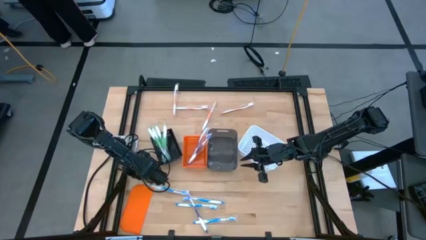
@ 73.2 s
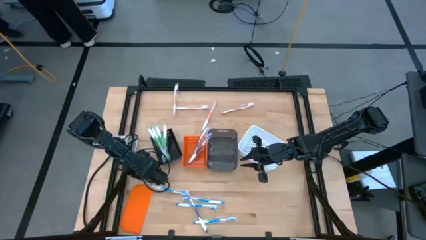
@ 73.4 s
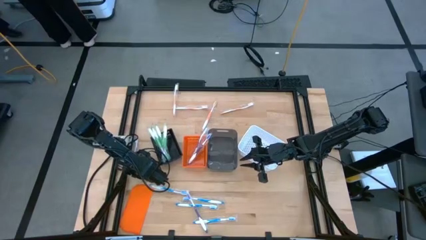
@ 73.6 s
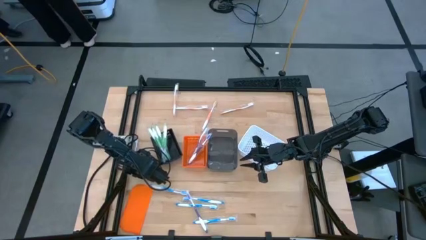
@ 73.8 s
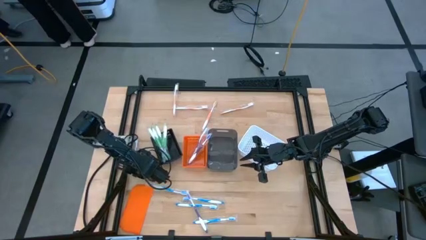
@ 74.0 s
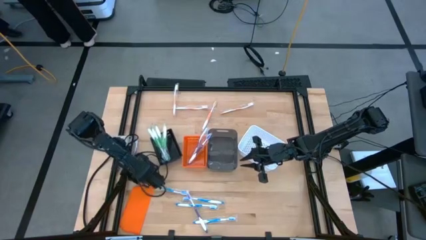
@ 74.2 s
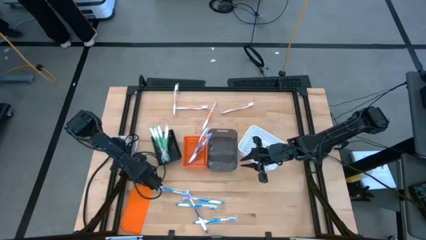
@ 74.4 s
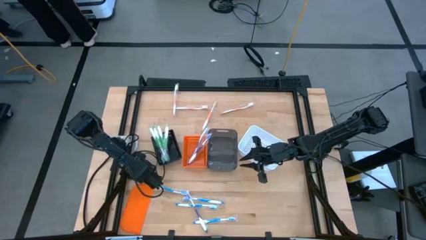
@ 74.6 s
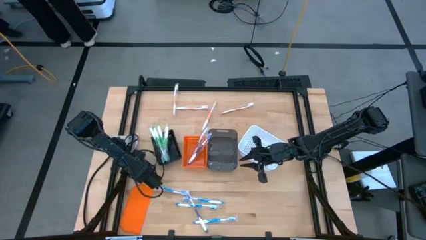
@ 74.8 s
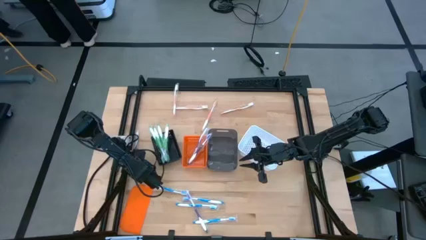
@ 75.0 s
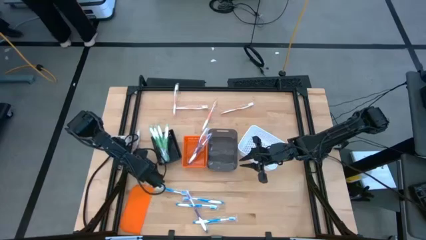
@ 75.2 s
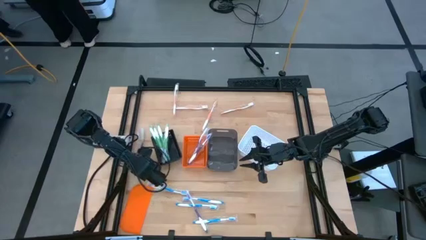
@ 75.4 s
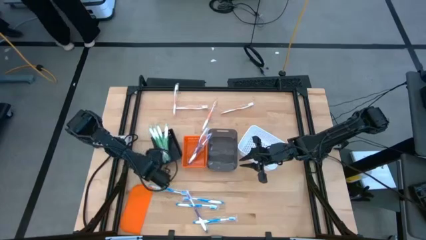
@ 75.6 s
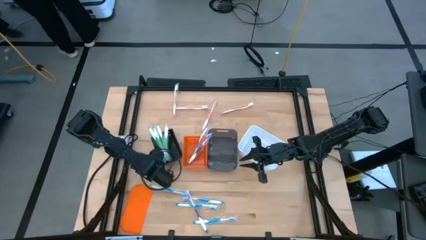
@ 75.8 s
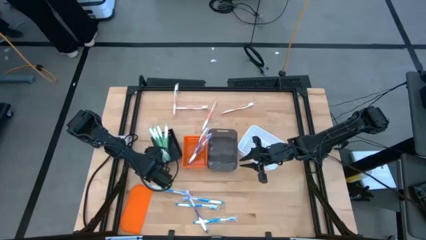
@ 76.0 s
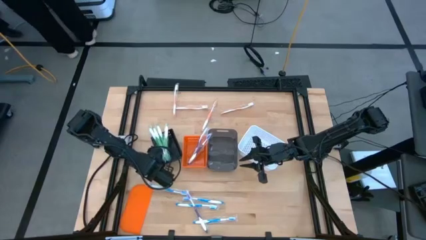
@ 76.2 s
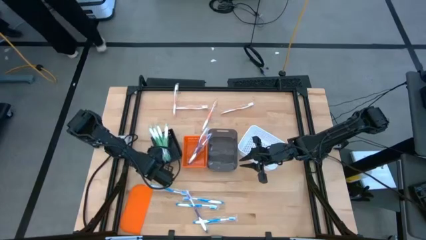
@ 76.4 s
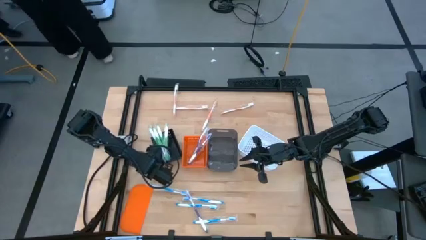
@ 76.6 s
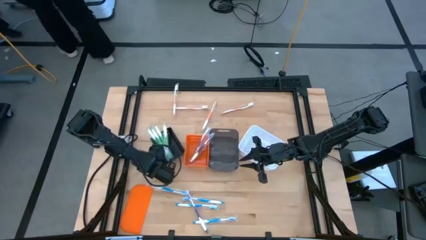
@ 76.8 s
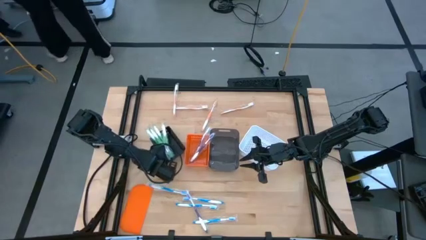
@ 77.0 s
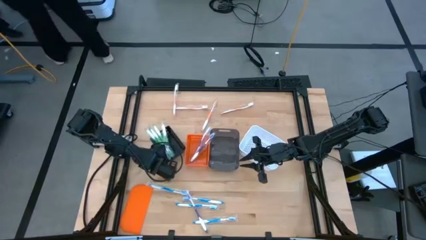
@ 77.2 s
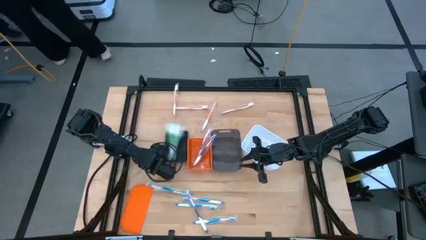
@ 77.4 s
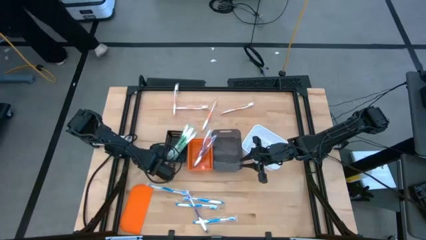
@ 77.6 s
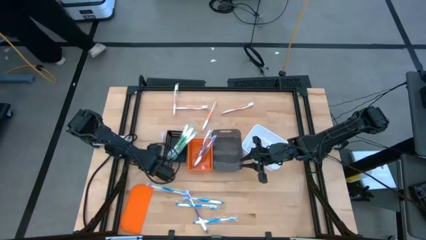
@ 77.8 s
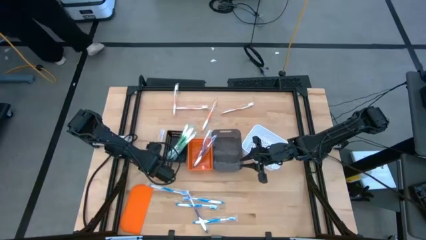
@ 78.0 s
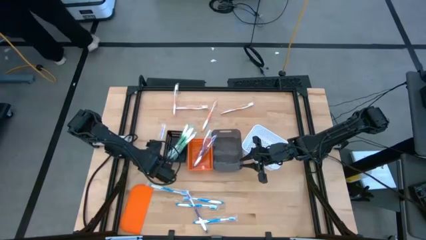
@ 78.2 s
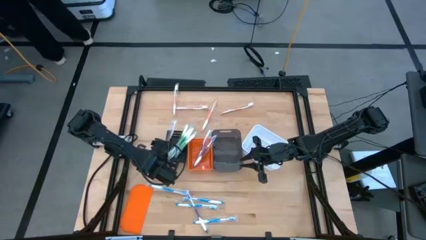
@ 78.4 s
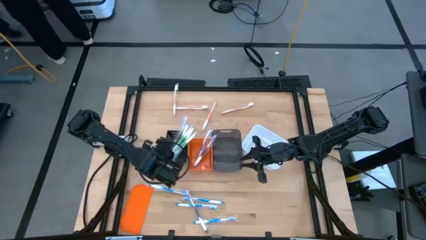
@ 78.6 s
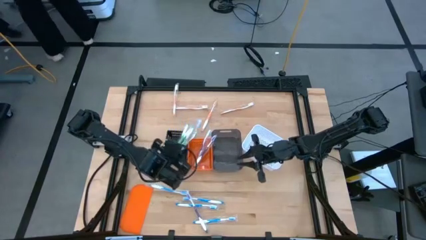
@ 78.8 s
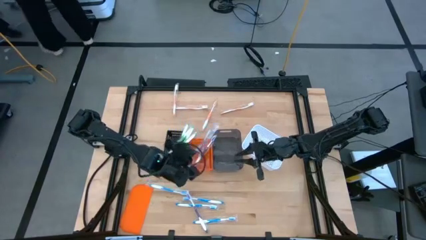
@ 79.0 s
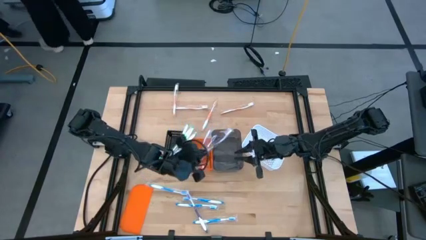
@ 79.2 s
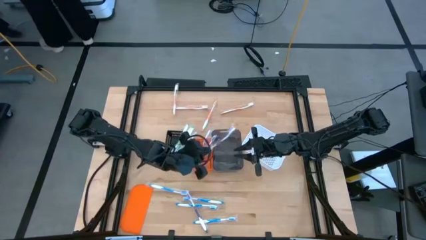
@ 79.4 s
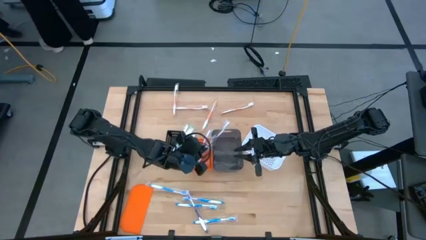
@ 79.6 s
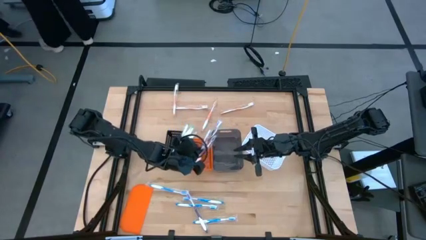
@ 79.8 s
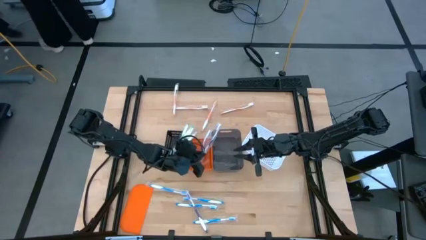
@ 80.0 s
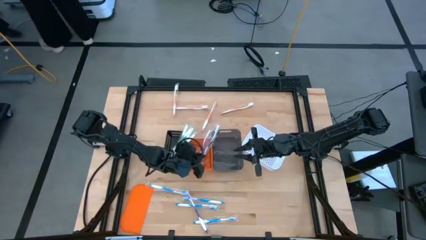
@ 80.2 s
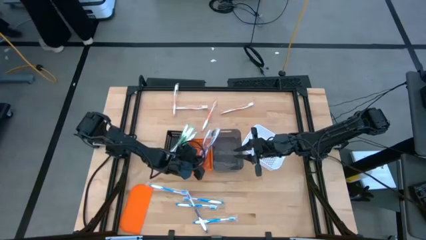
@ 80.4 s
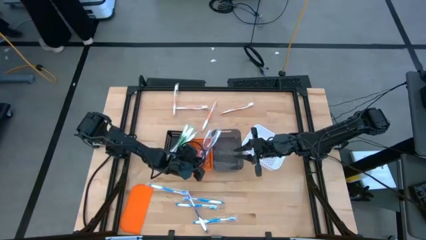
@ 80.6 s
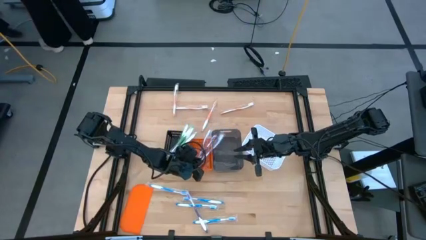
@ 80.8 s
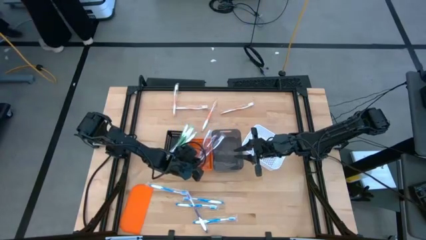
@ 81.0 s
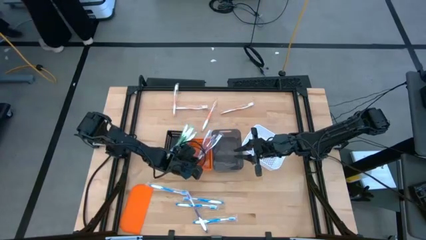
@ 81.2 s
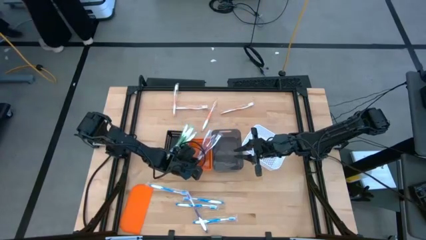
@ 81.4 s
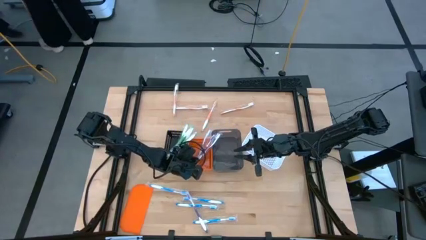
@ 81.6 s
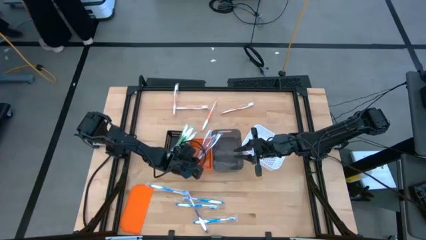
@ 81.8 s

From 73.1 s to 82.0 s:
Task: Pick & Place Toothbrushes
Put the violet toothbrush into the orange bin

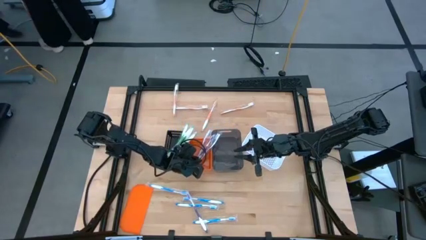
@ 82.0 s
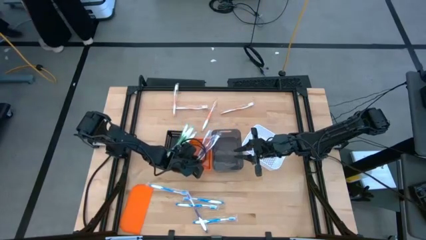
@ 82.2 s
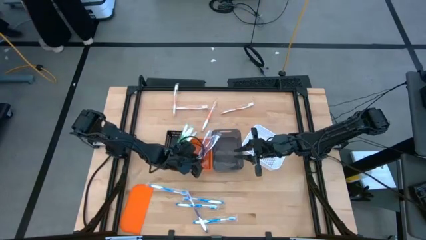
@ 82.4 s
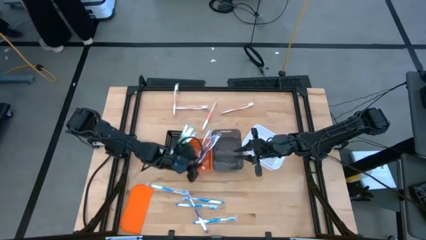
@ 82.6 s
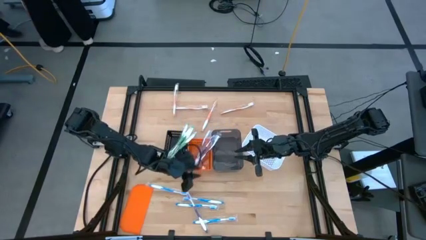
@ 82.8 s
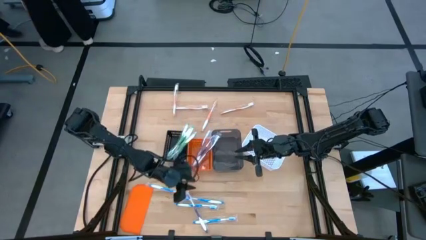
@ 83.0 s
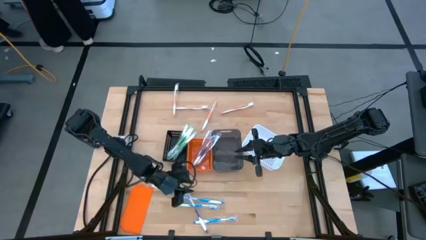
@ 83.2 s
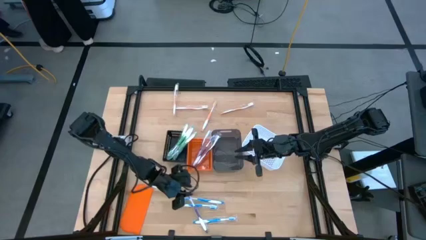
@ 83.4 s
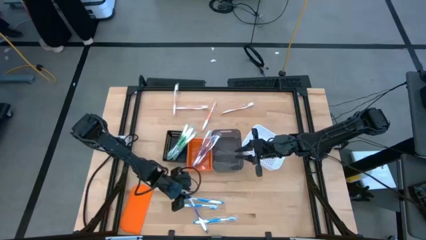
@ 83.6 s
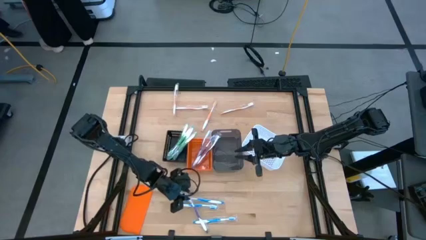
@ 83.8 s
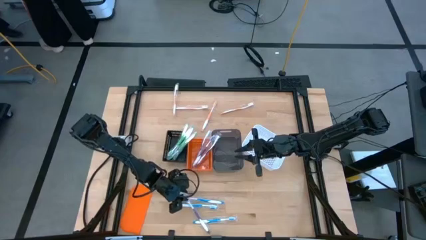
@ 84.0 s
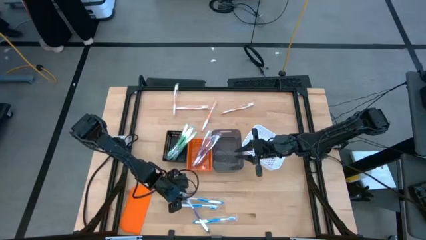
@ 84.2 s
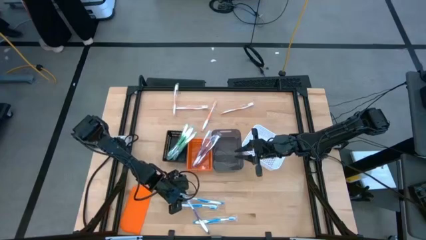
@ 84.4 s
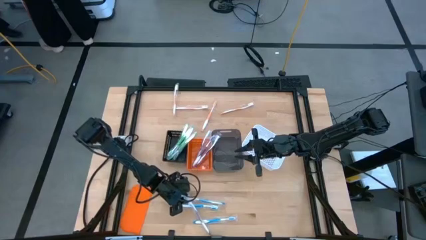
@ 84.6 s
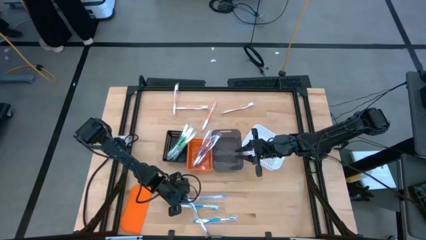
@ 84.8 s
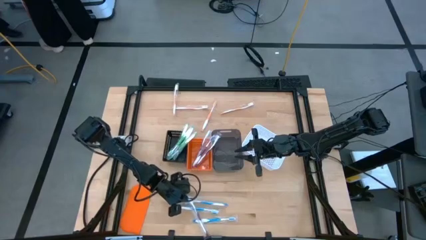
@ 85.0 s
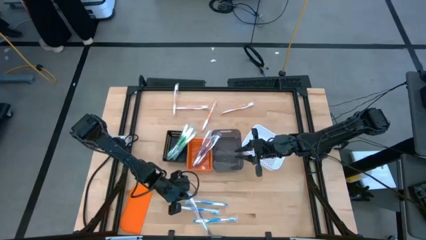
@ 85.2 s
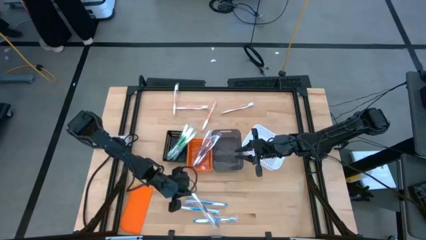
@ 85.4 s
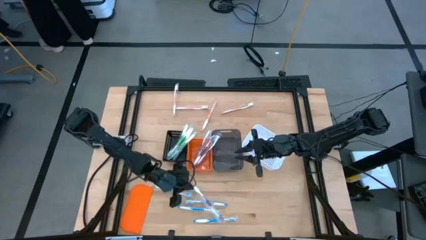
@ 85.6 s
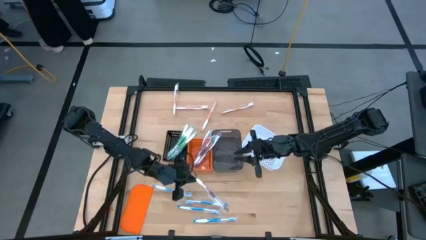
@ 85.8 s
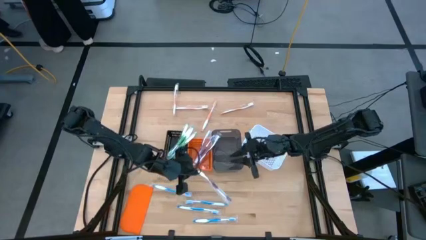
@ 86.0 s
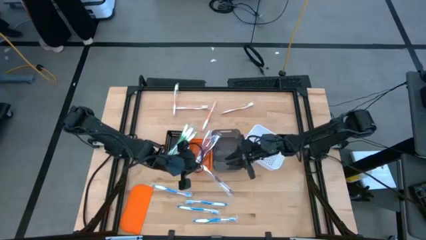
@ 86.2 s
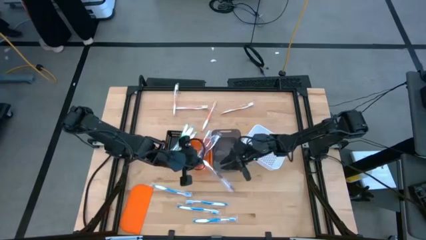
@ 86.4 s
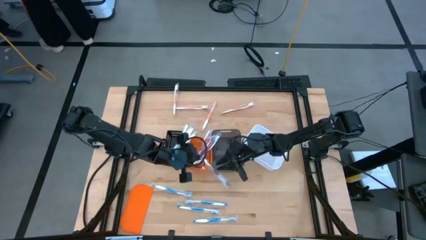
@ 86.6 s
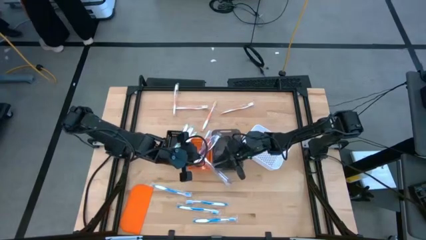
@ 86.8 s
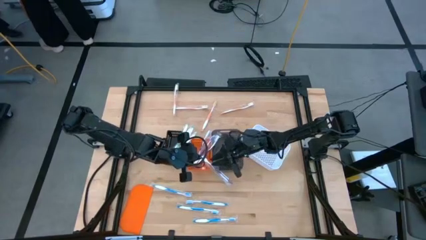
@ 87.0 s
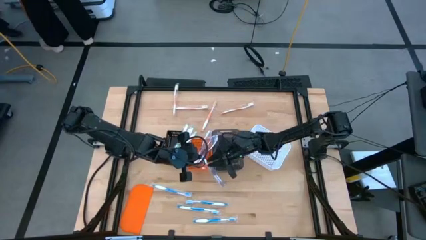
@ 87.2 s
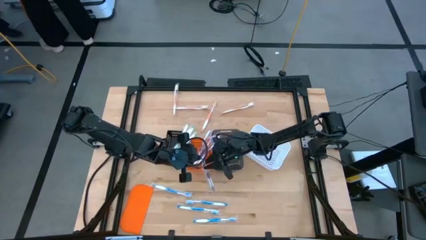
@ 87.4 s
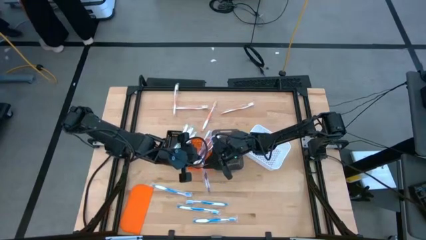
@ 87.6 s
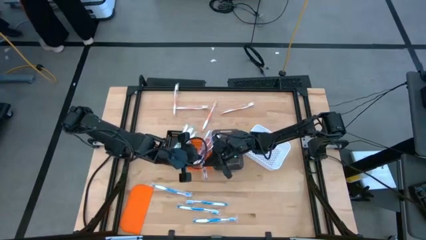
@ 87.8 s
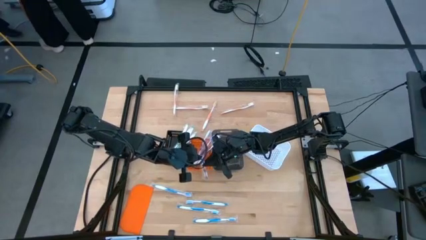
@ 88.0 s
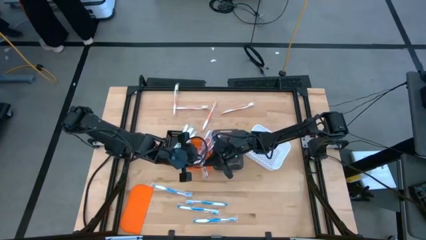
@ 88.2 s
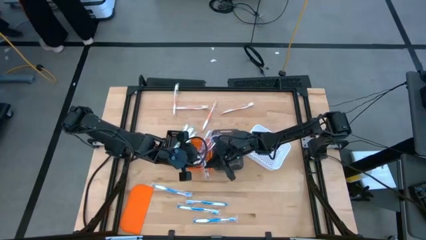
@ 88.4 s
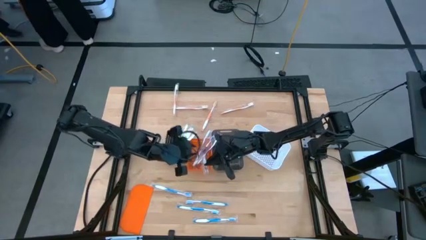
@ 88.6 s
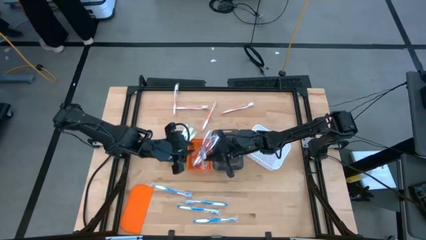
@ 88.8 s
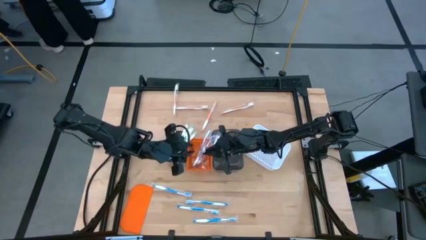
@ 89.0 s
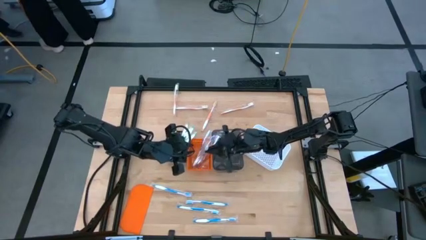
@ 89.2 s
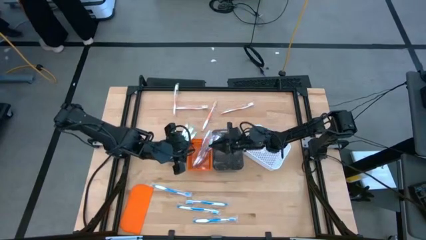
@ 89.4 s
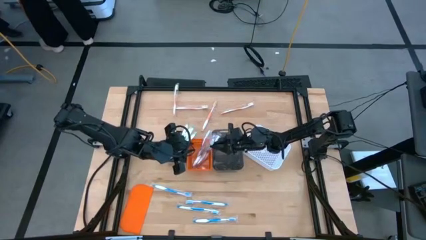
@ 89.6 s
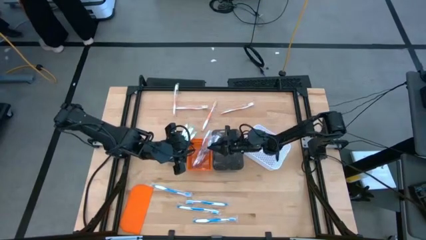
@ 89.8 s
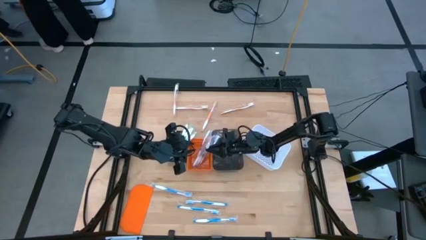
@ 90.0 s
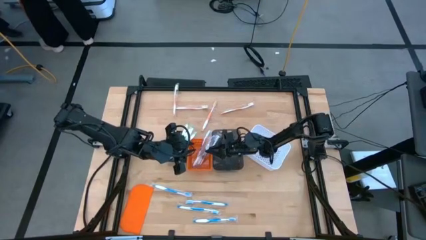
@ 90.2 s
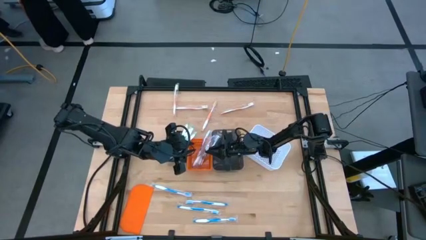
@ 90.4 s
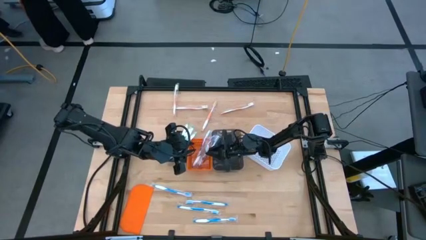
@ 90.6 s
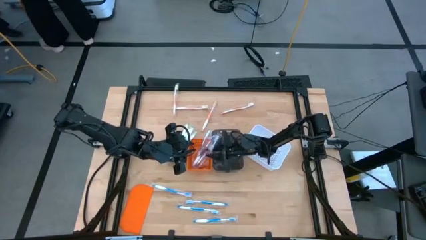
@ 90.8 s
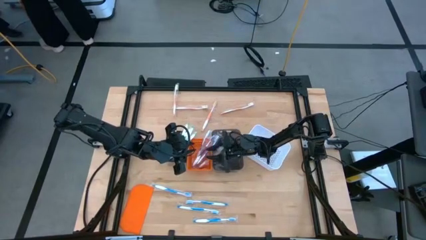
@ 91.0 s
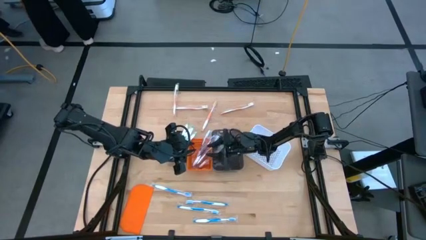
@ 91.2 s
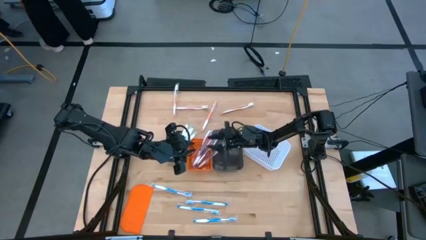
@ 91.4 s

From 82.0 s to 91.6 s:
Put the violet toothbrush into the orange bin
